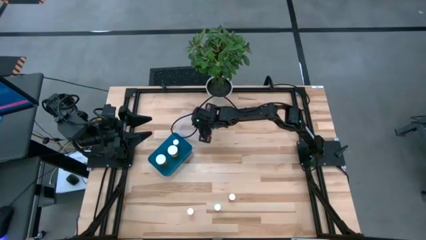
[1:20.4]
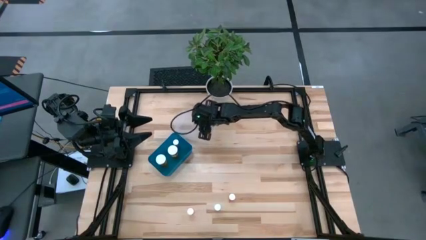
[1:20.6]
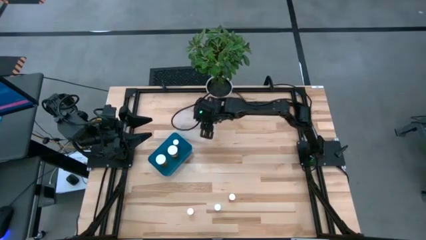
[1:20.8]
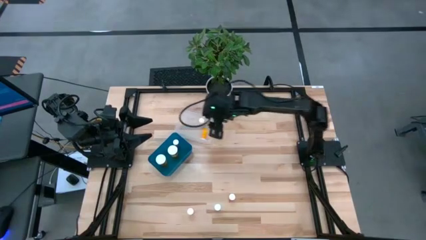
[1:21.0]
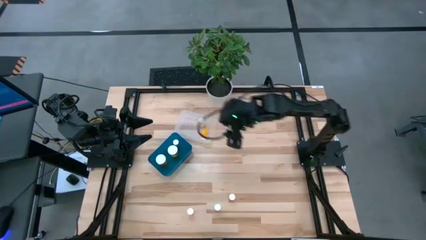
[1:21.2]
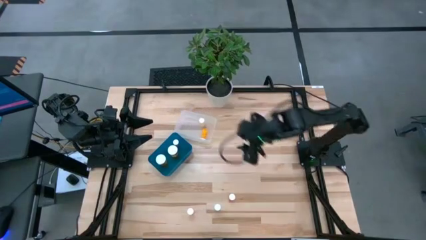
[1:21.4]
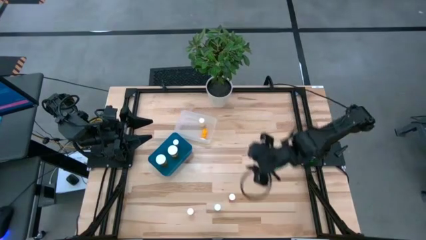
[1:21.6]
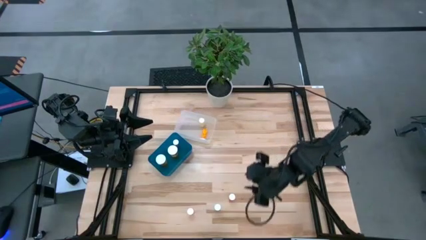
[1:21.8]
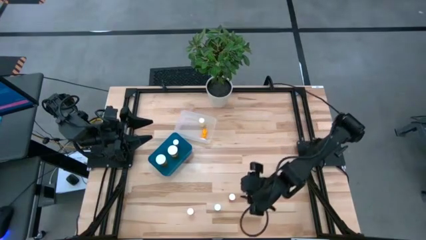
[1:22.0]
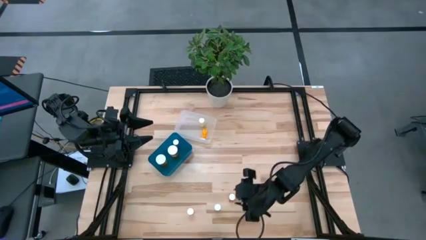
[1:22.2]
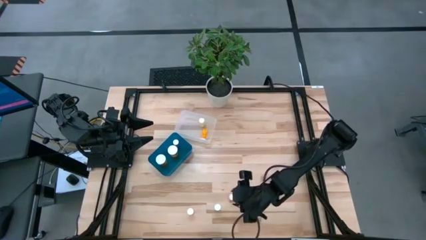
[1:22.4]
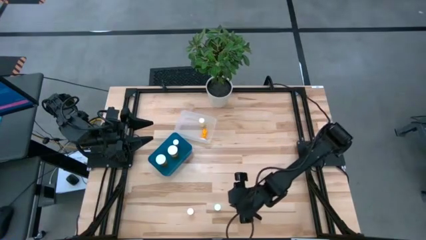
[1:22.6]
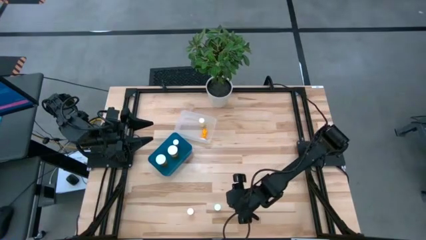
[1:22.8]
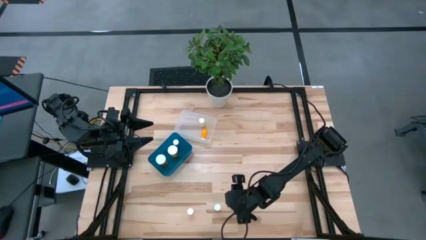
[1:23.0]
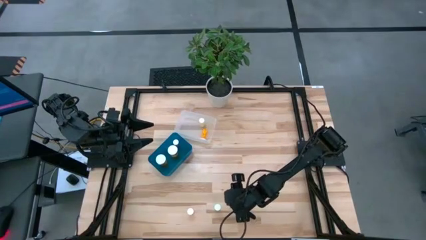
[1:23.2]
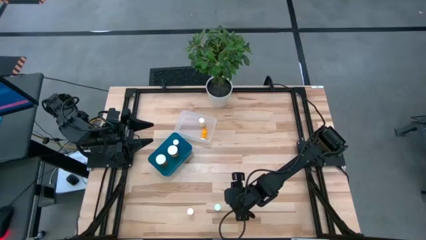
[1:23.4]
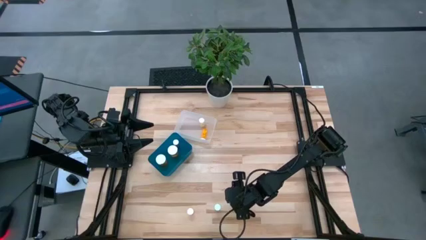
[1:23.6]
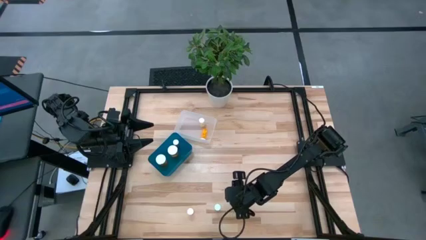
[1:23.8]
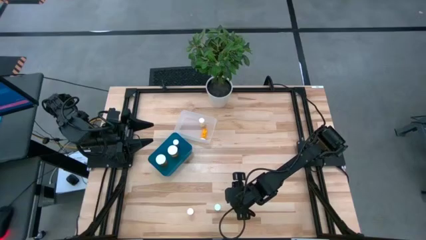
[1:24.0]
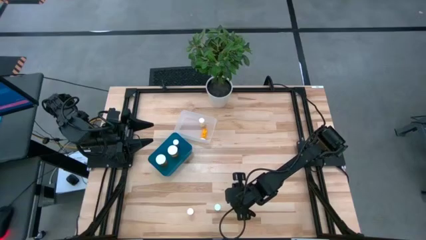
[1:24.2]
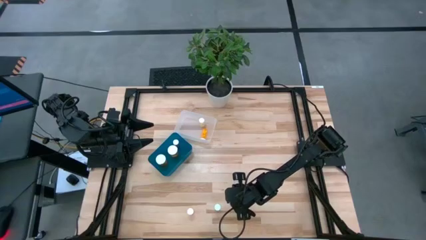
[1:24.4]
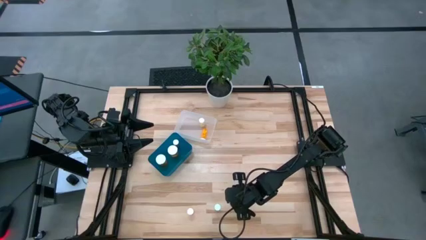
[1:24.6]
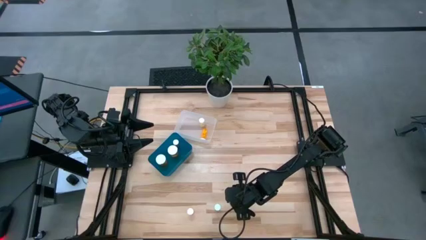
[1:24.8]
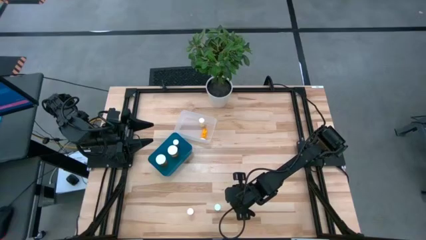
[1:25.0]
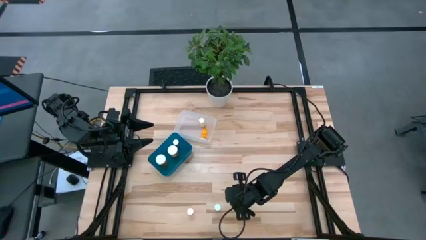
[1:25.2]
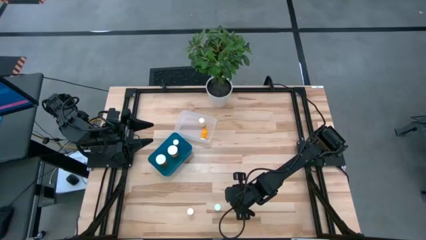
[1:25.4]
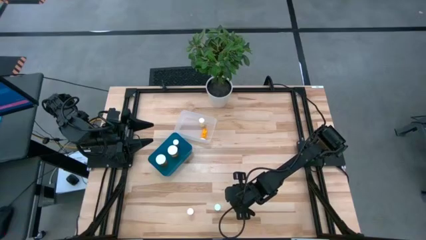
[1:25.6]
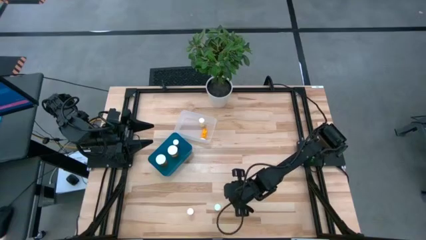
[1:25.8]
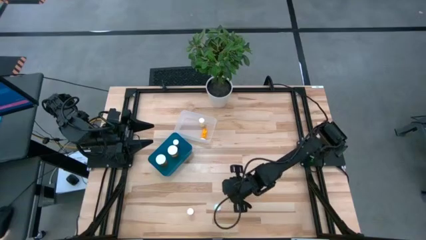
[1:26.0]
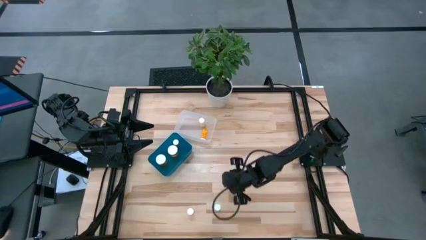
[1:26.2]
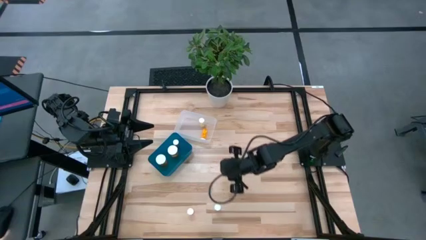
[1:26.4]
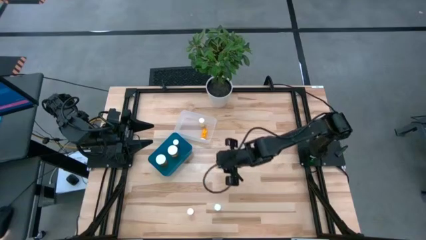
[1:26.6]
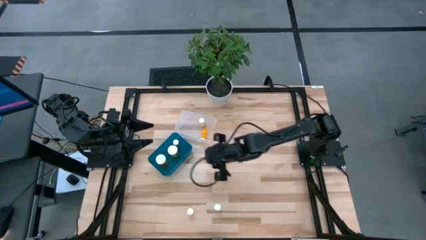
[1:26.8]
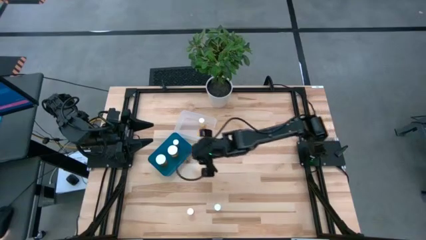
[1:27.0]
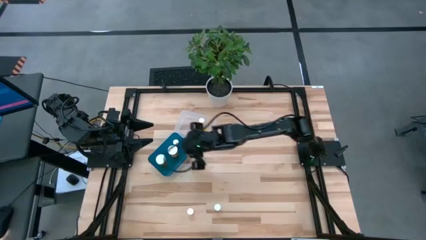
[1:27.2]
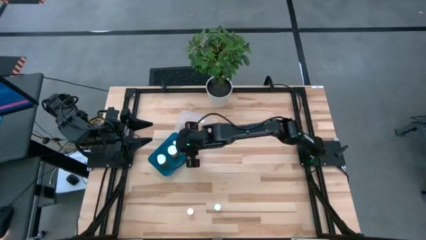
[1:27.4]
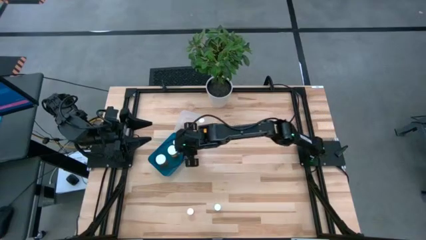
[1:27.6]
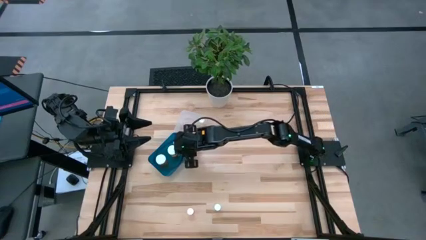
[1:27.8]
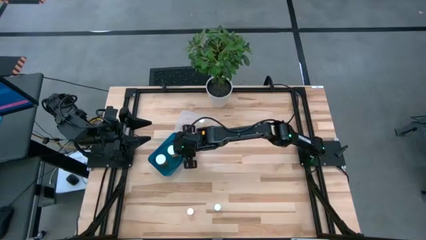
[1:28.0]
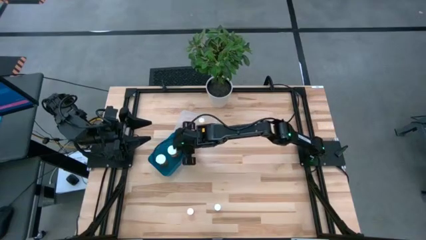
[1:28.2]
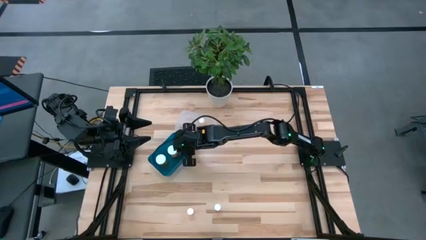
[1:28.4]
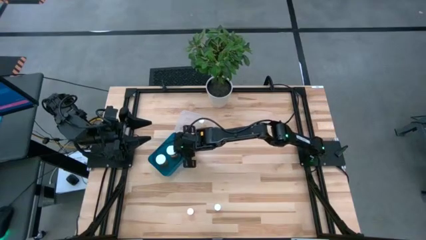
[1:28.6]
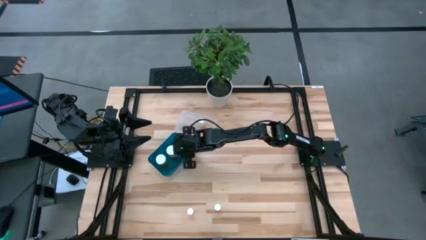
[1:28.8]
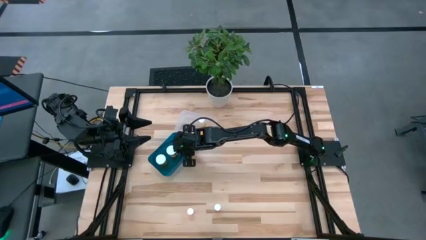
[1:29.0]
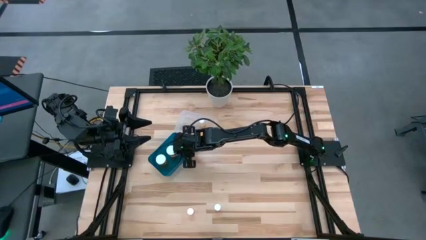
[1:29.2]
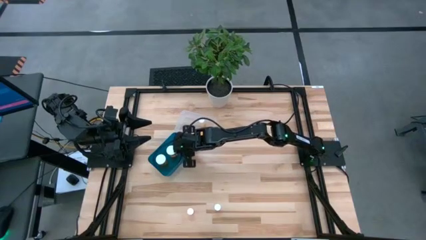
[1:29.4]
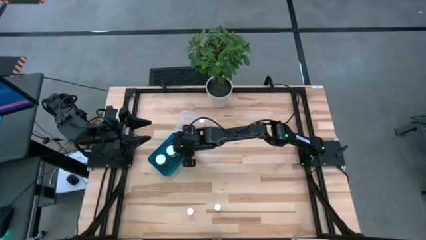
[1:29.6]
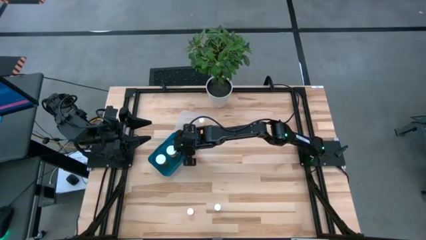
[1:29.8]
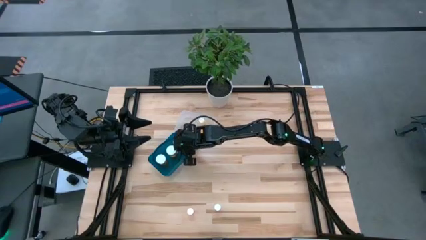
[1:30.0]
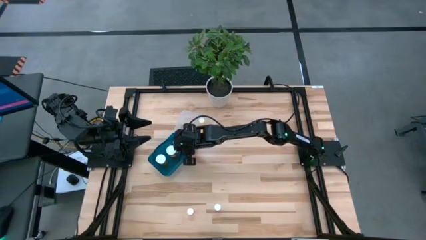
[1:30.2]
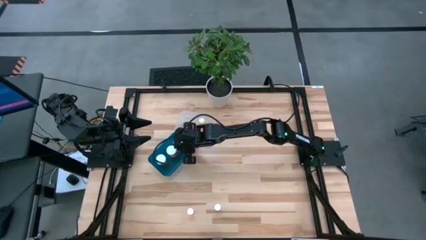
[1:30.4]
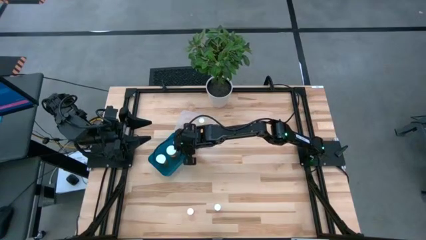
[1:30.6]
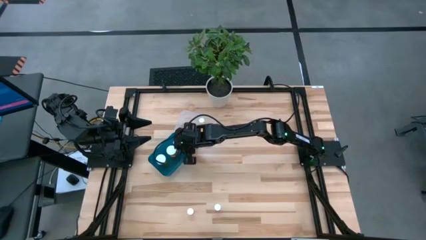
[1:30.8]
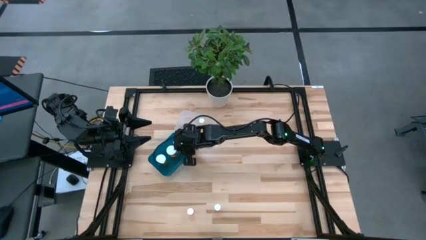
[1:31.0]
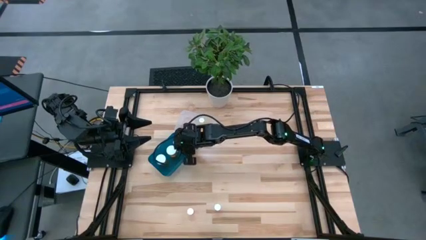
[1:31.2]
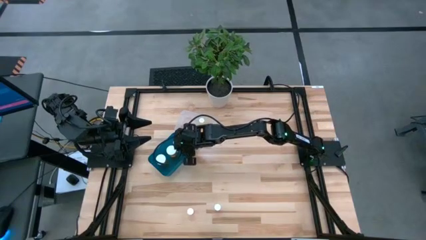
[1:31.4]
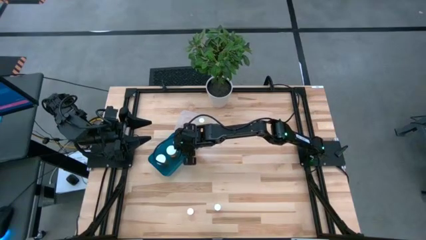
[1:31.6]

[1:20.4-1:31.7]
Task: Pick and place medicine bottles into bin by pill shape (circle, oval)
Put the orange pill bottle into the blue bin

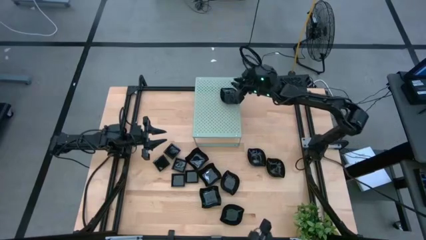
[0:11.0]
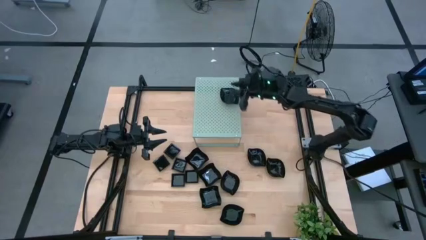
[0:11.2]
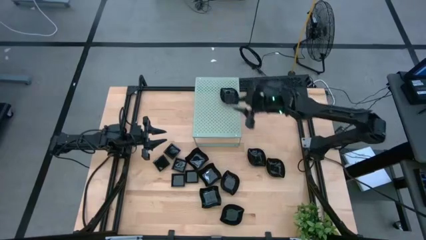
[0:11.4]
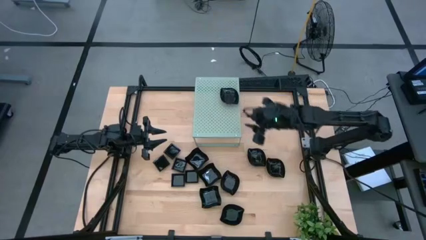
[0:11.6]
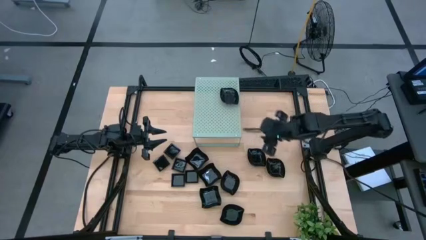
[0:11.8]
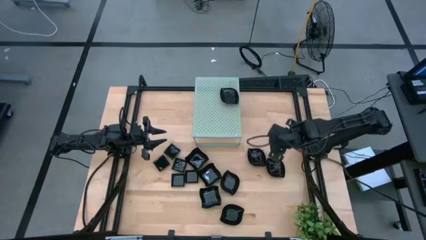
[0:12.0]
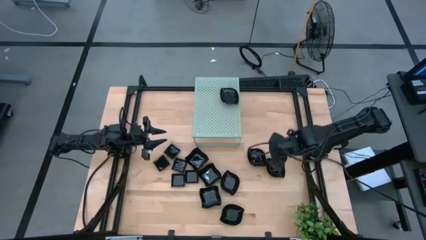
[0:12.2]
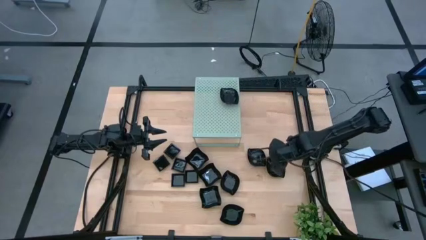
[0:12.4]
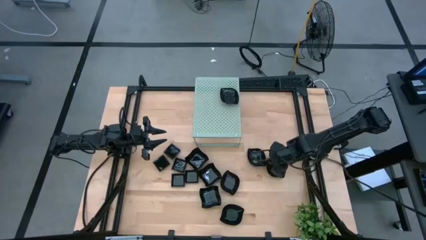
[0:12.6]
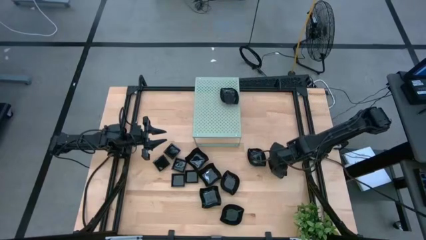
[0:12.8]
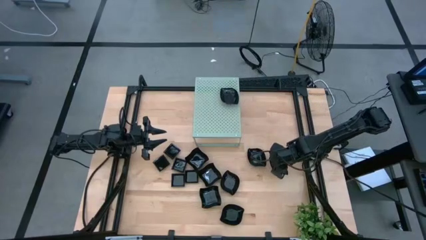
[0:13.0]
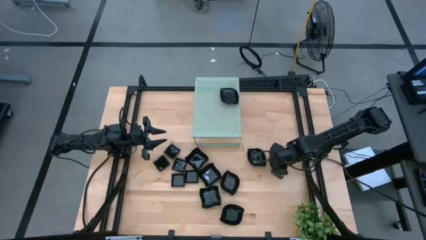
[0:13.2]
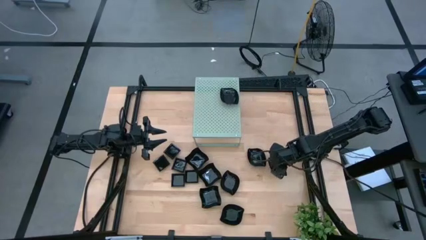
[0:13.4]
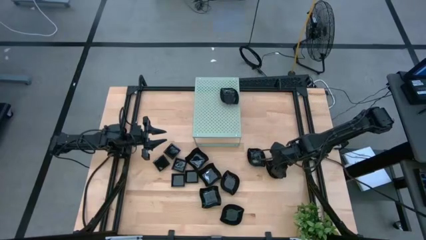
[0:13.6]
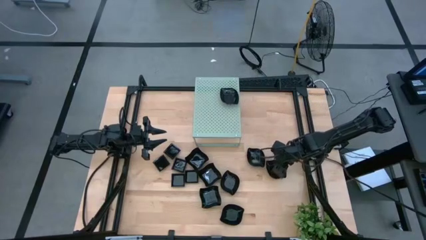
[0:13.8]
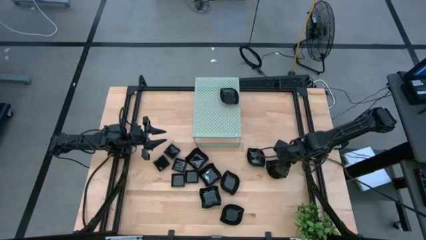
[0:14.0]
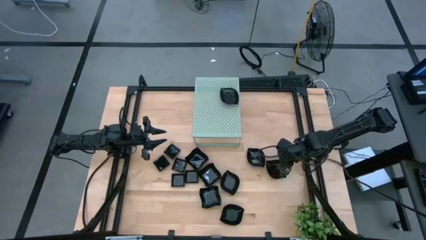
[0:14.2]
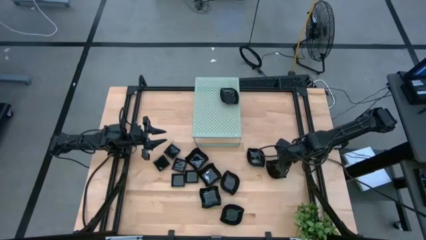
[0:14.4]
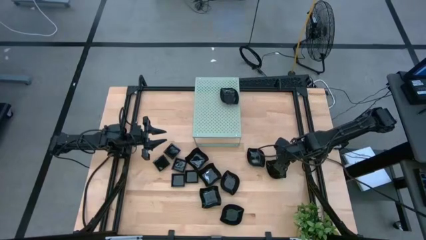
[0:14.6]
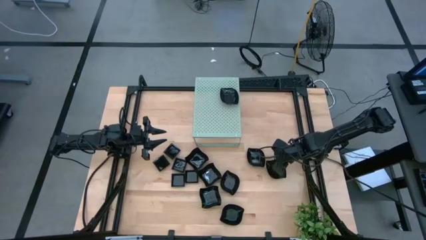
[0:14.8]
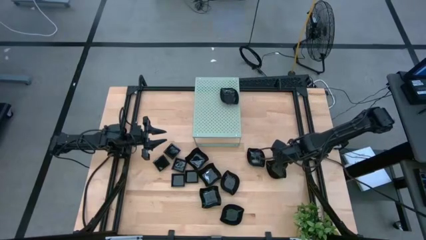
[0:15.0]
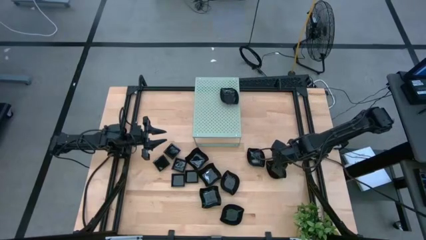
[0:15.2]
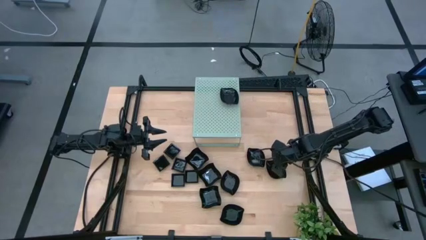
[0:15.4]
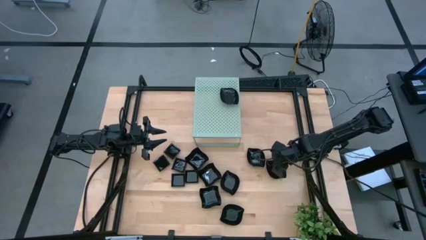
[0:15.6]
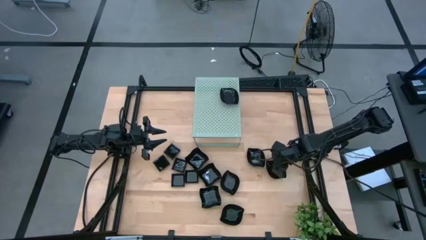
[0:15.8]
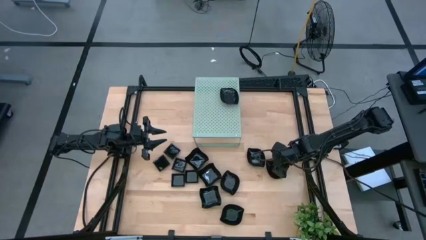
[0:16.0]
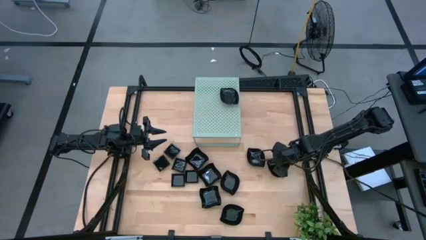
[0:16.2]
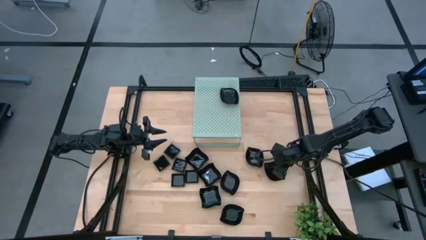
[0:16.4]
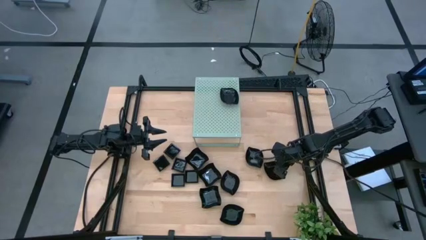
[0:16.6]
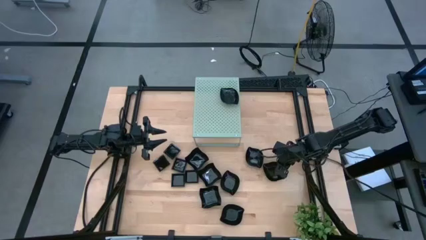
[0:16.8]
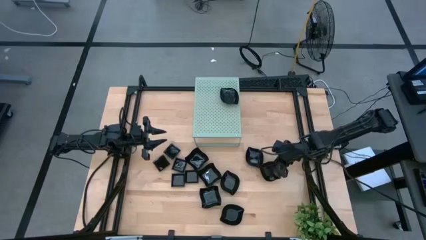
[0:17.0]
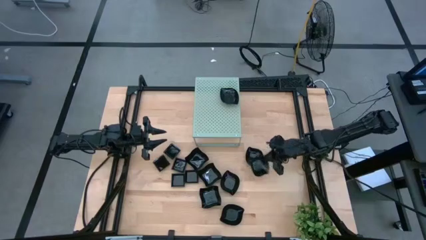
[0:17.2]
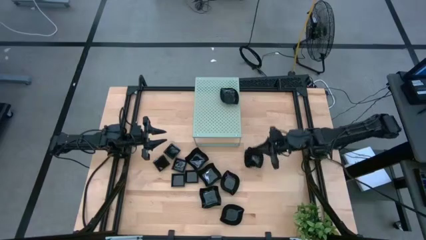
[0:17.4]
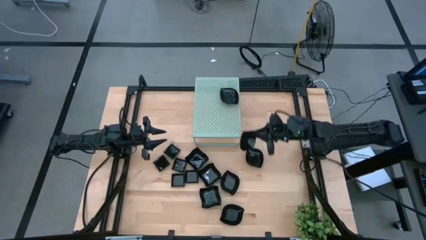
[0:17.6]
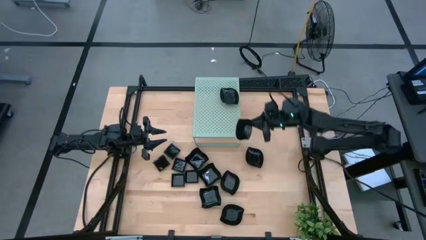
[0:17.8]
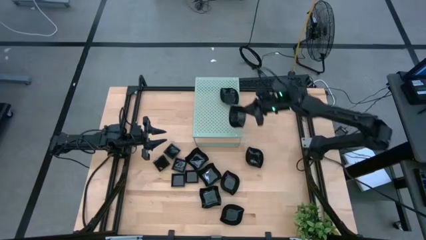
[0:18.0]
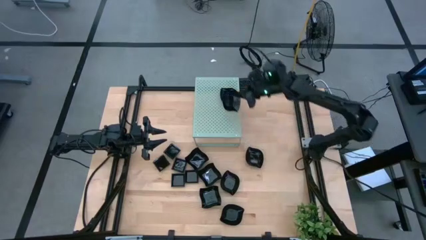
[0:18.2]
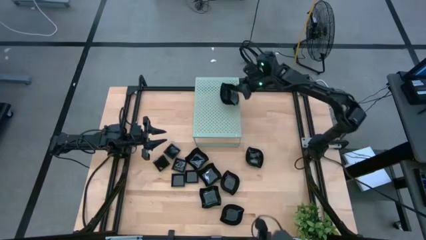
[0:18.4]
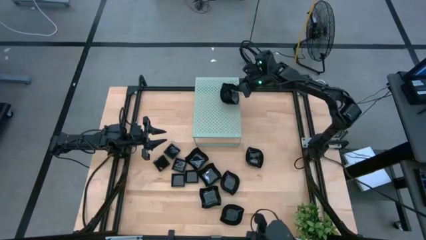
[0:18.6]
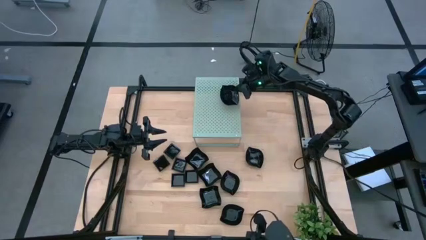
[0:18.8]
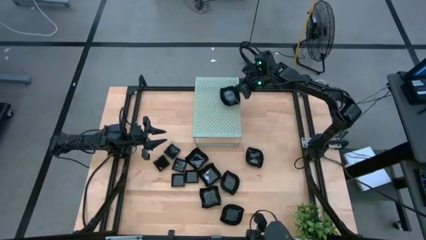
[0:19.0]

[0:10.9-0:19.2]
Task: Pick & Place Mini shaped plates
Stack the black leaf-shaped plate on top of the other leaf-shaped plate on the shelf
